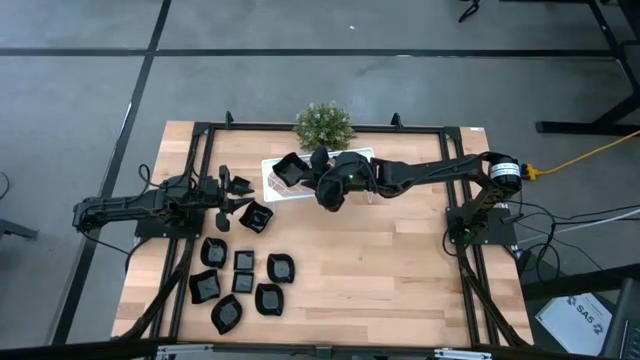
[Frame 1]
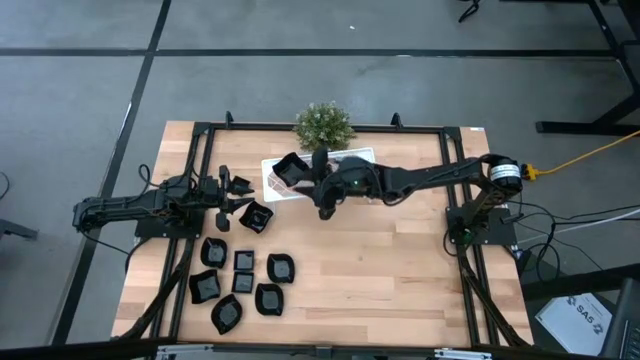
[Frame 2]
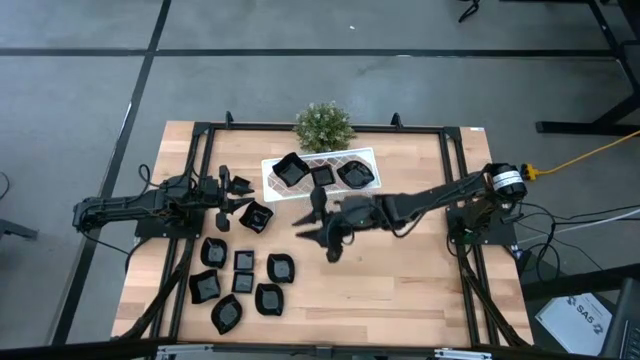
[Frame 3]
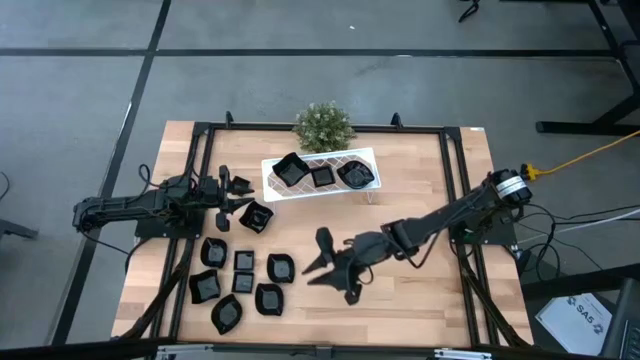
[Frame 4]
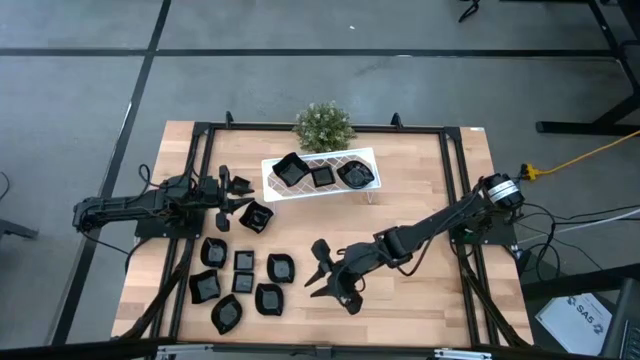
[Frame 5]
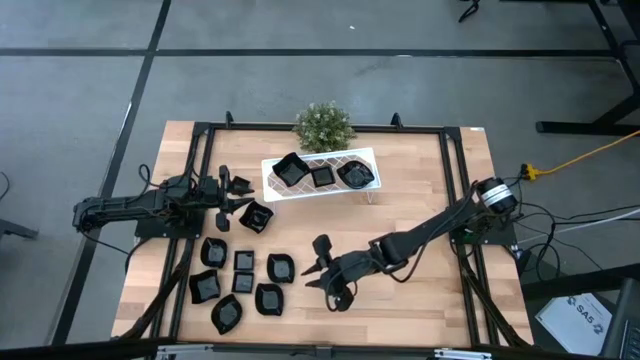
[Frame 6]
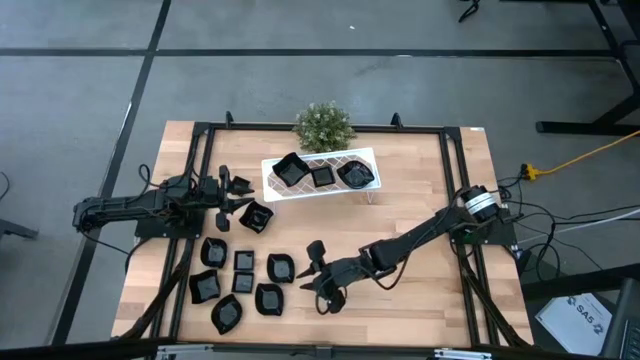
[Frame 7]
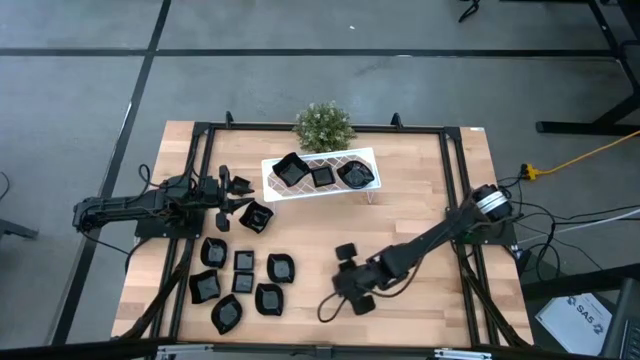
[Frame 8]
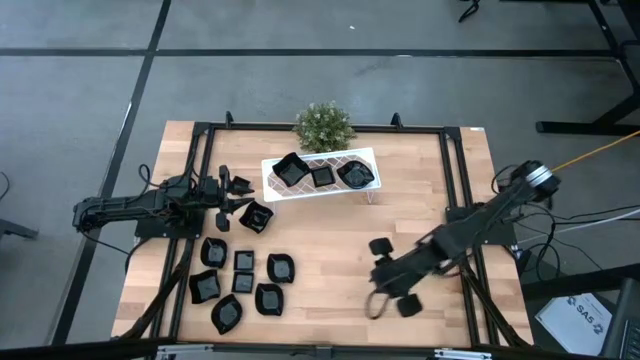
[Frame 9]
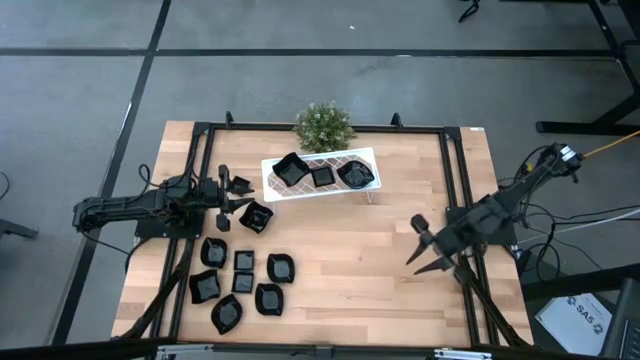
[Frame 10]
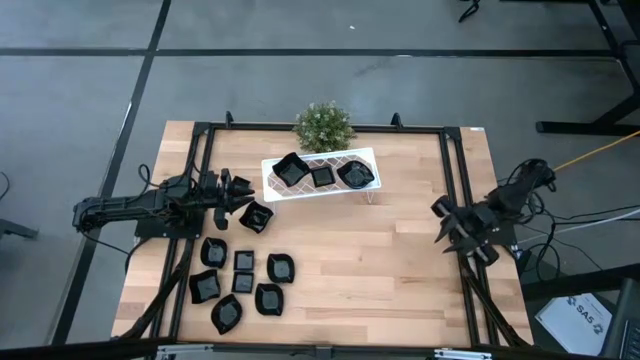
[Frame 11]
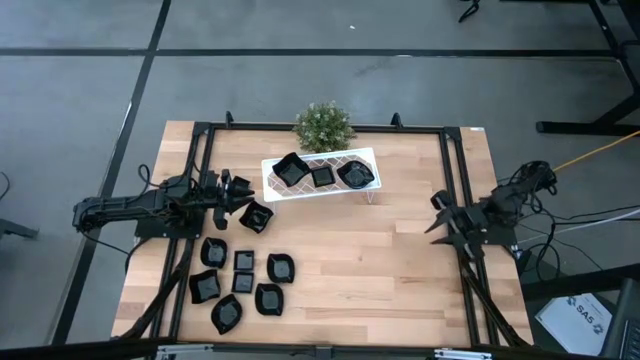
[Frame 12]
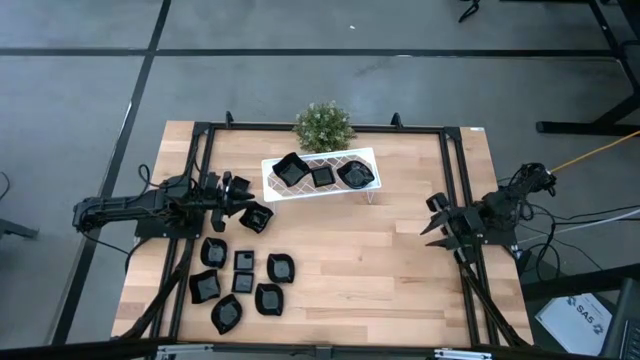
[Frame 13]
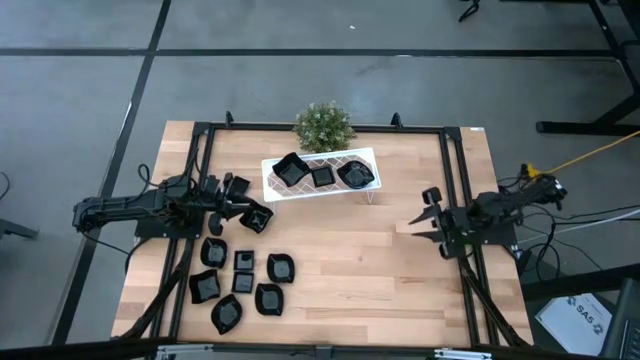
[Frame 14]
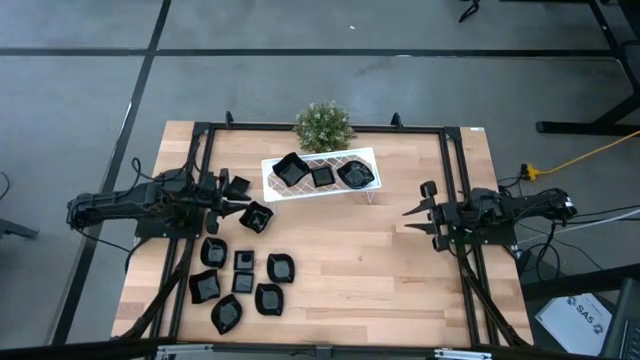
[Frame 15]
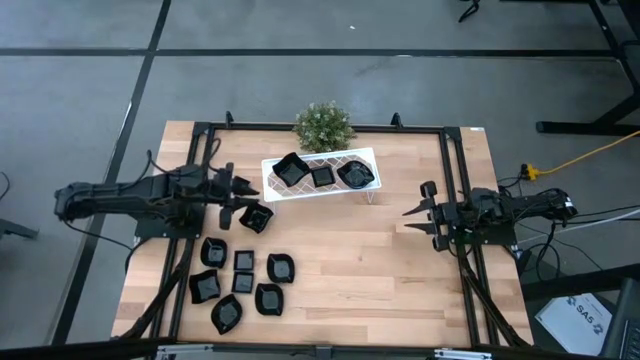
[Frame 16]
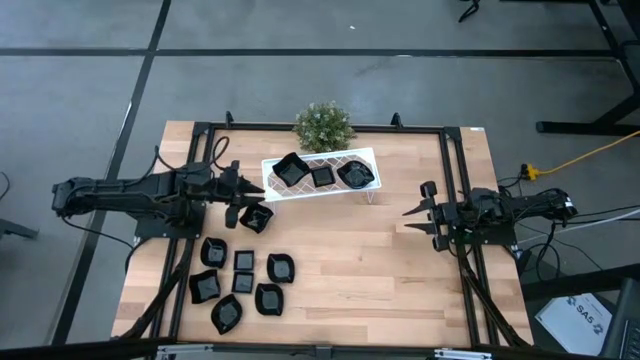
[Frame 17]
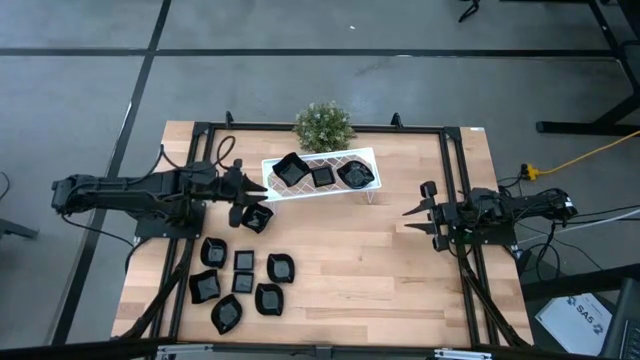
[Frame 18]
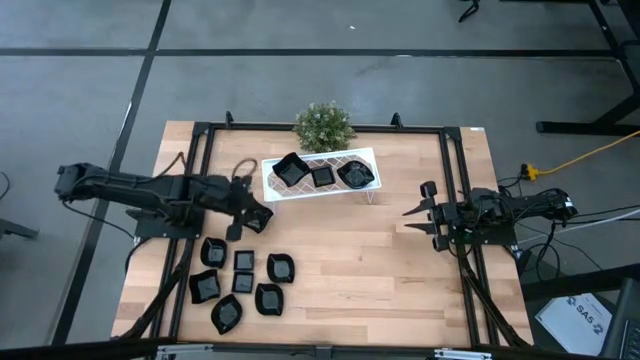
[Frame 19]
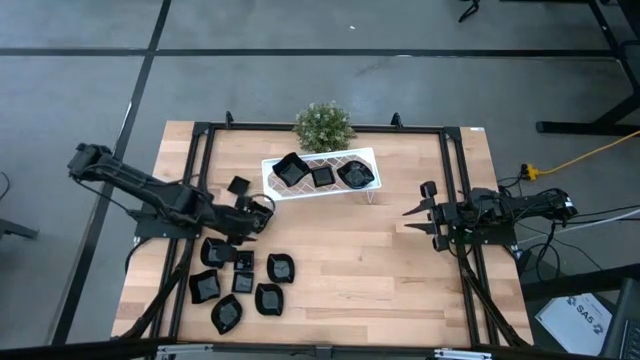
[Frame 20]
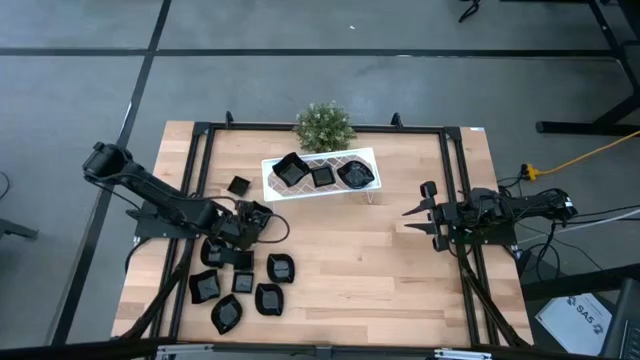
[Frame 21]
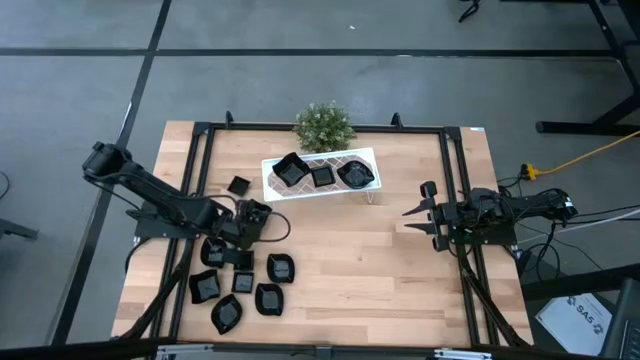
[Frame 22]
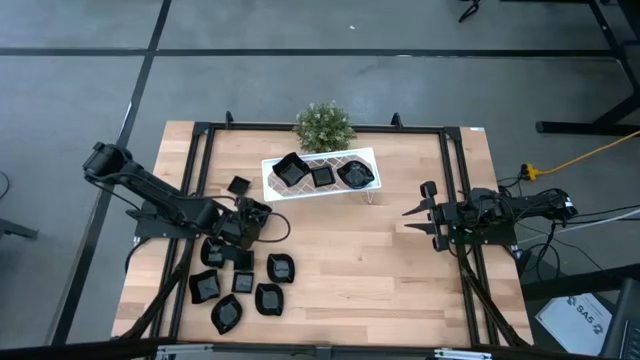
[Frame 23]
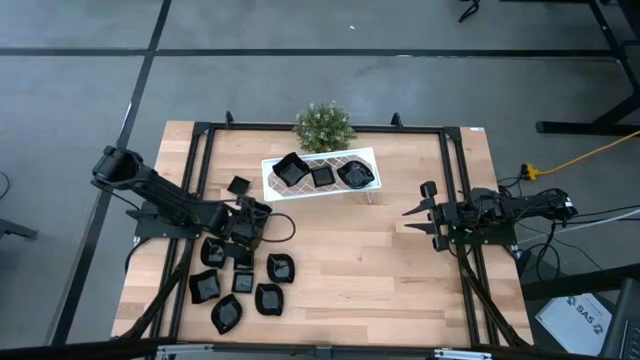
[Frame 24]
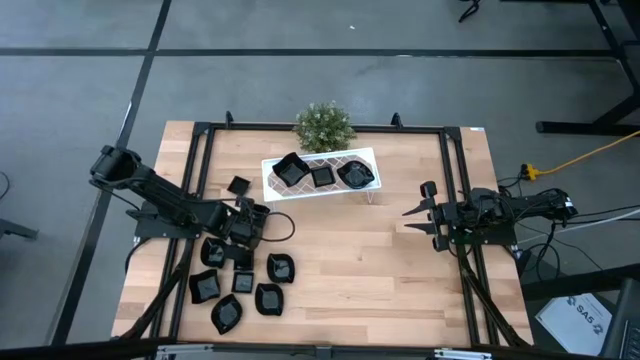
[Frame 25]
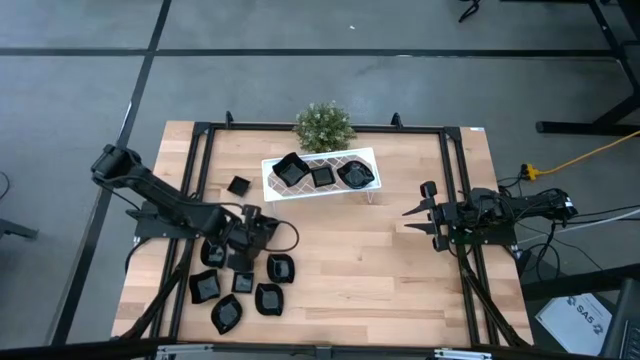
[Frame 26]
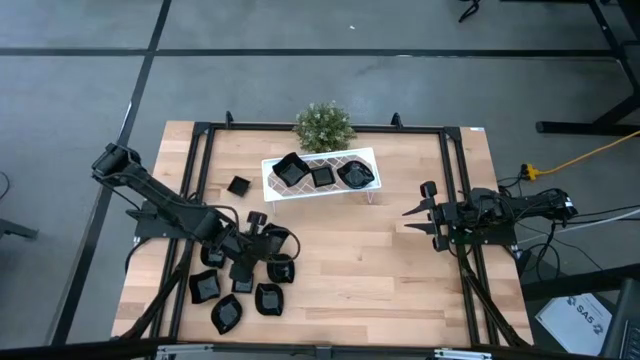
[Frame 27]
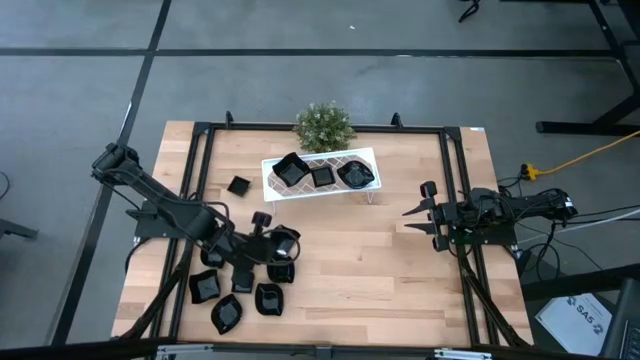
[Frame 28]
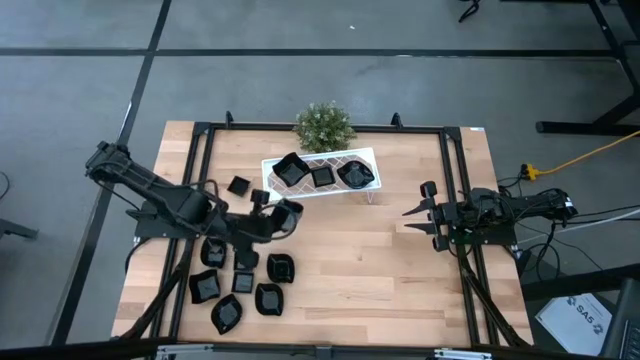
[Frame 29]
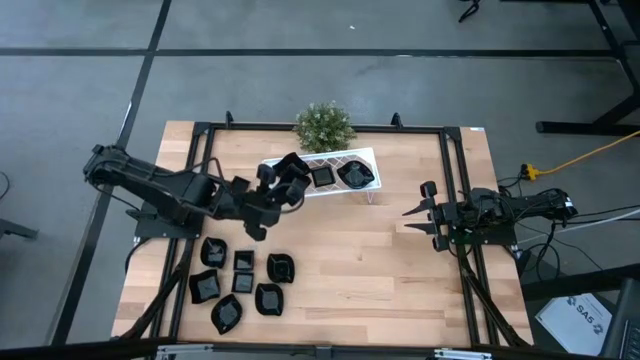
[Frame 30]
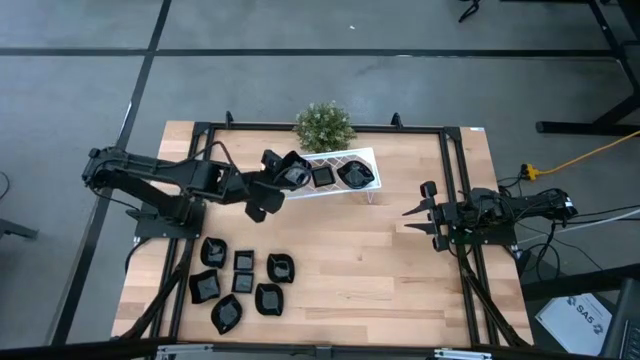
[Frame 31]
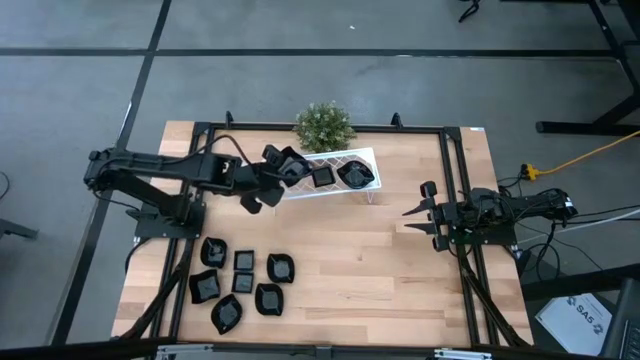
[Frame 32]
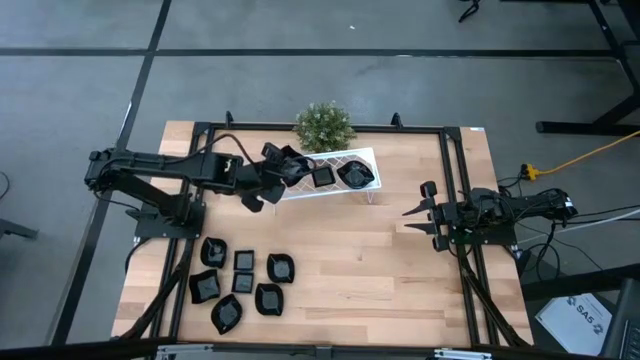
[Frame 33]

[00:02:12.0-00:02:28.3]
Task: Pick & Place Mini shaped plates
Stack the distorted square plate on top of the distorted square plate on the shelf

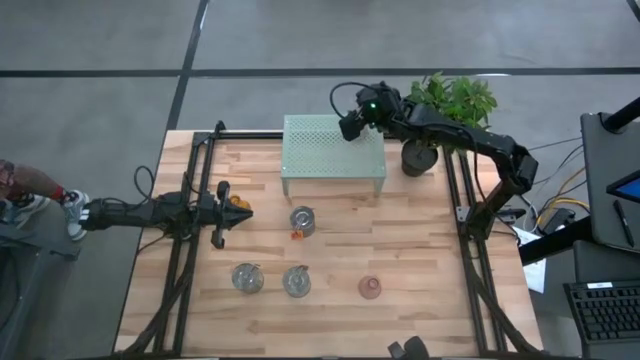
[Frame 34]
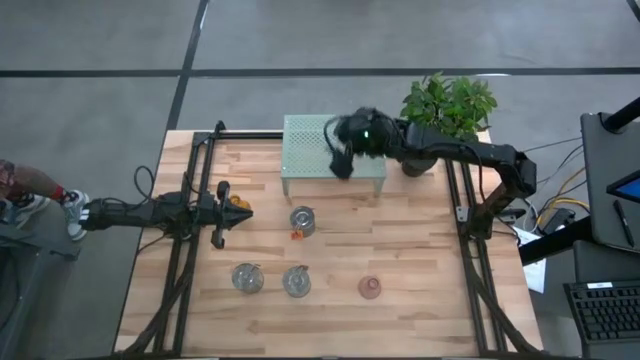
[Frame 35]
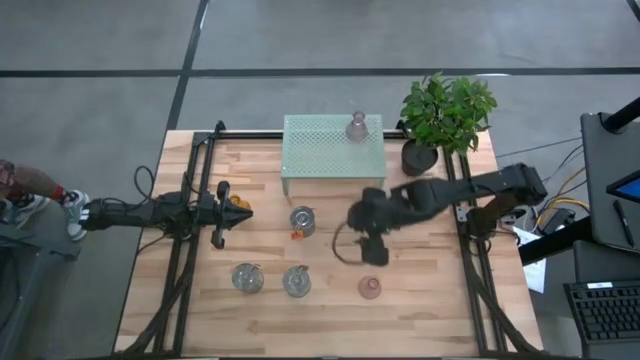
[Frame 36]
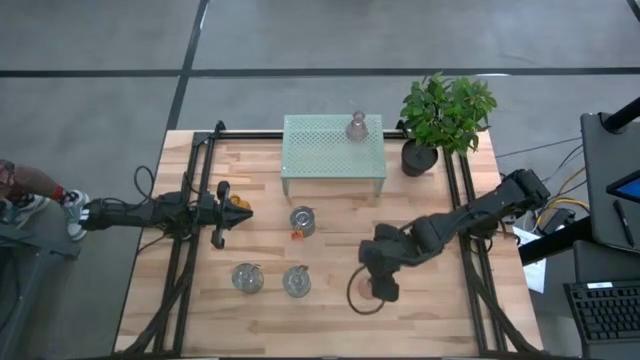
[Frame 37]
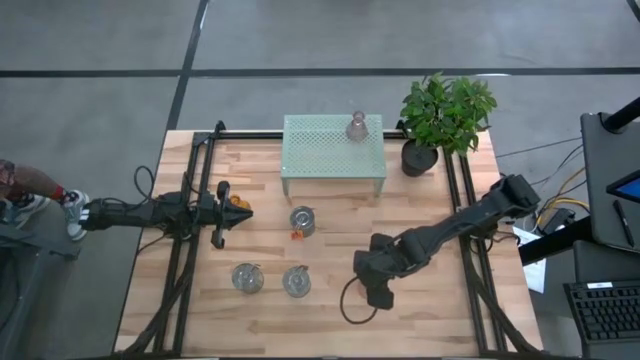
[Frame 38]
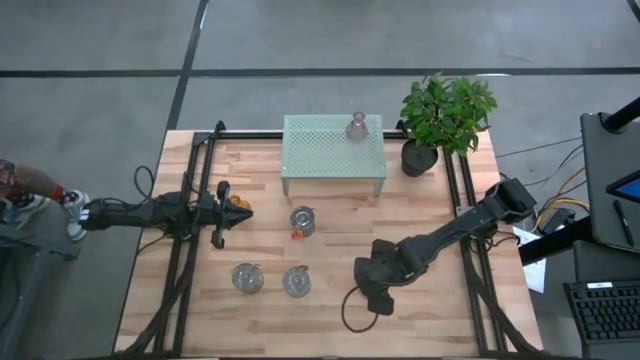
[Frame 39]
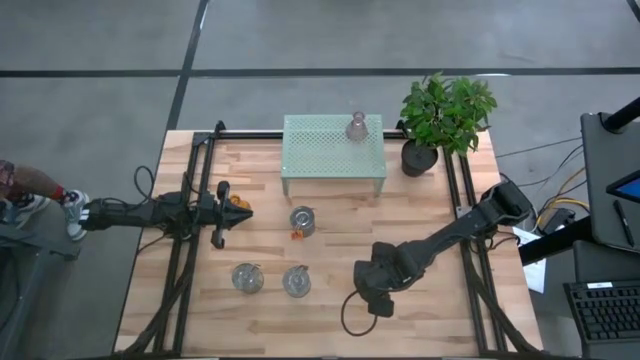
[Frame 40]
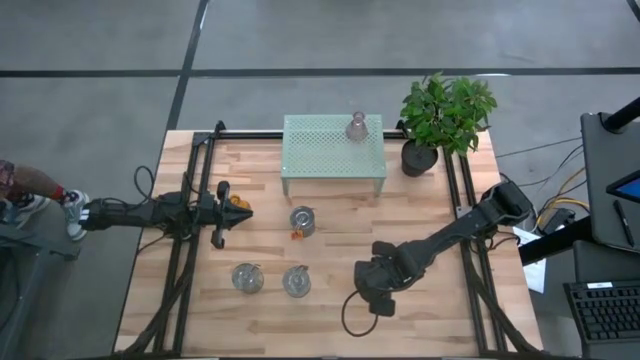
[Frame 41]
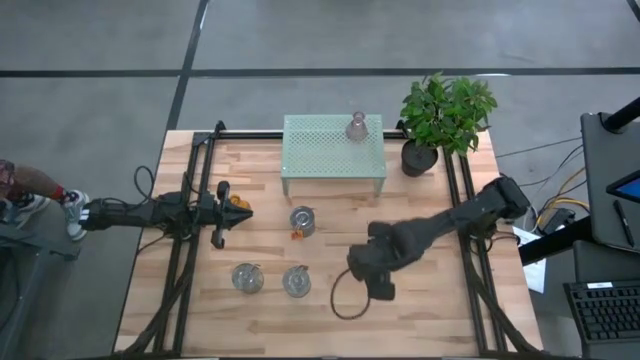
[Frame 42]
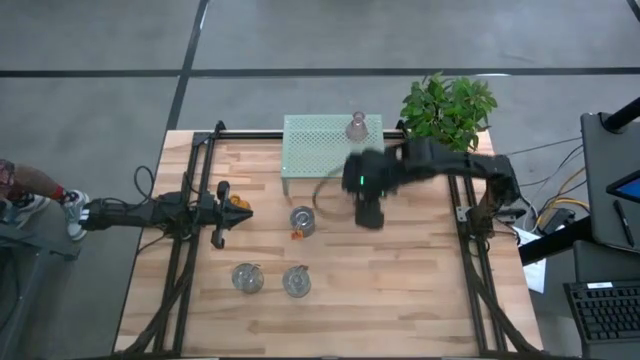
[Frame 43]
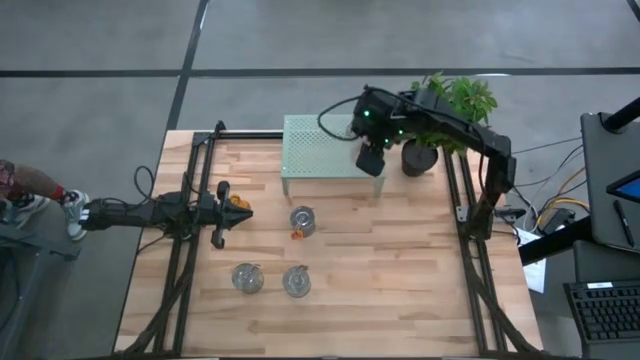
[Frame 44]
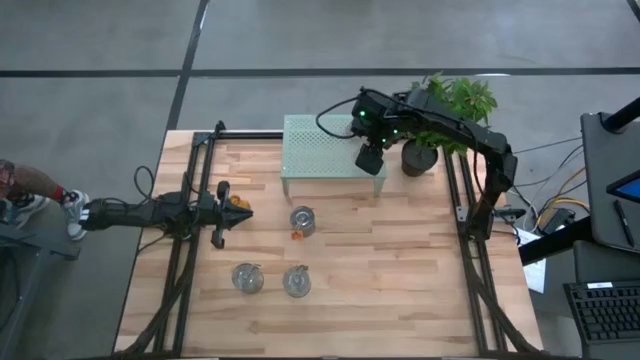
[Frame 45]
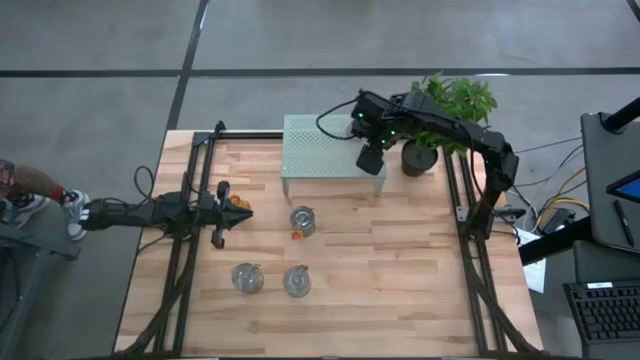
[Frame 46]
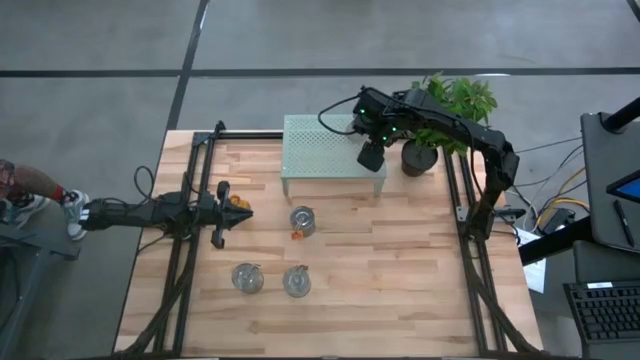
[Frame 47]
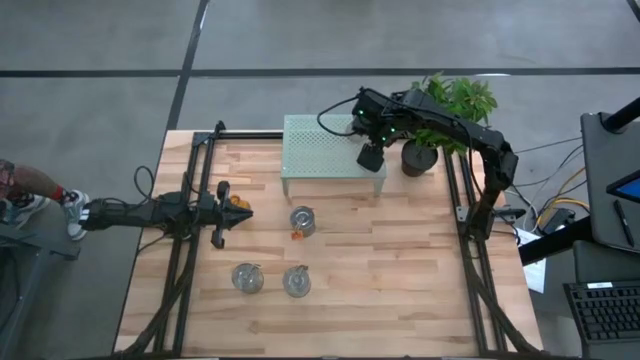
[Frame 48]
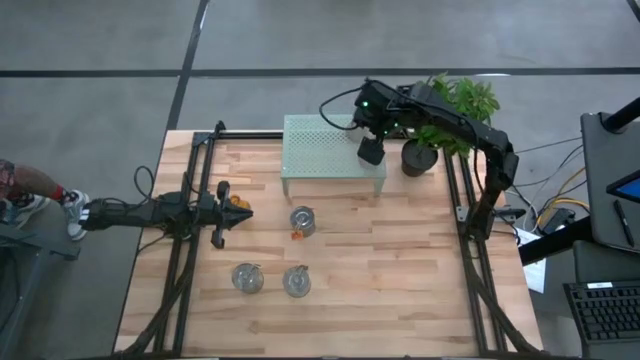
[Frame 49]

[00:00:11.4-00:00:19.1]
Task: Pick & Place candle stick holders
Put the pink glass candle holder on the shelf
